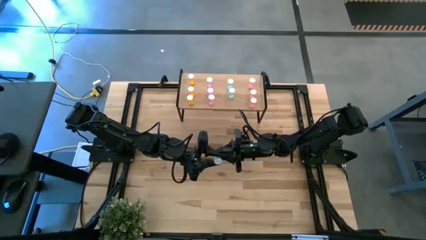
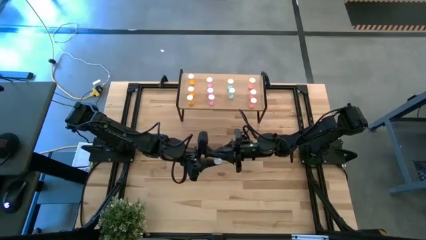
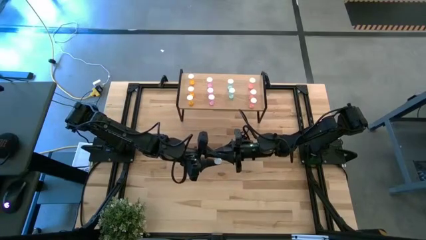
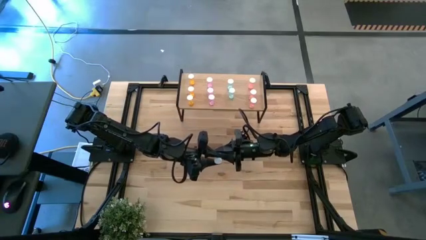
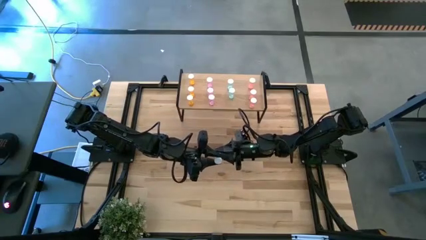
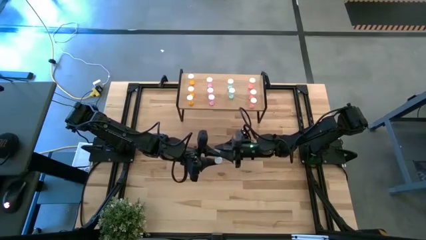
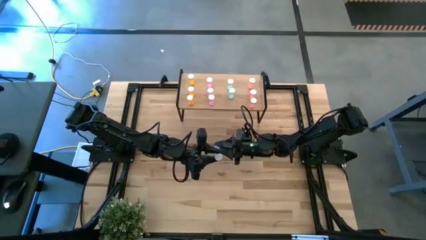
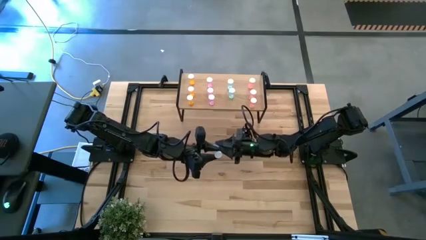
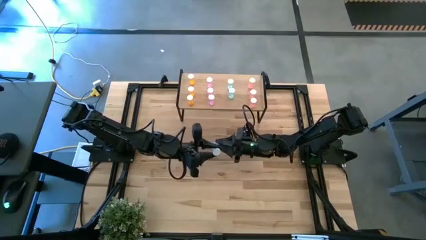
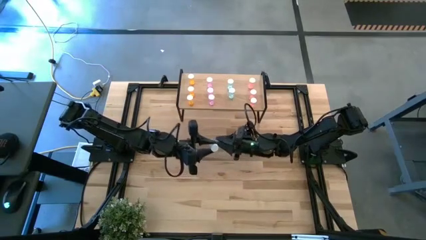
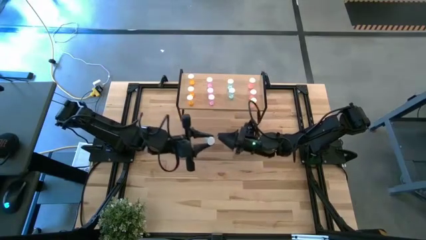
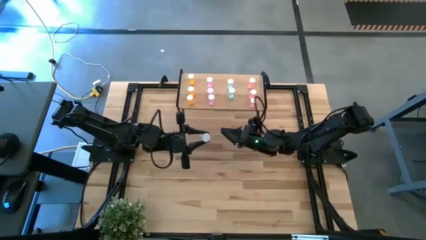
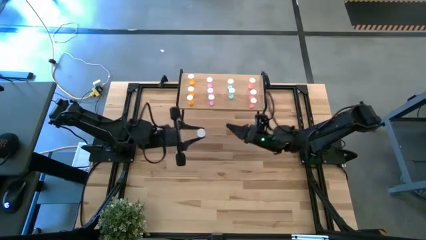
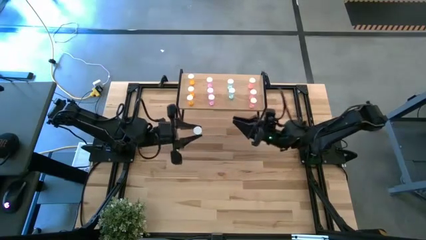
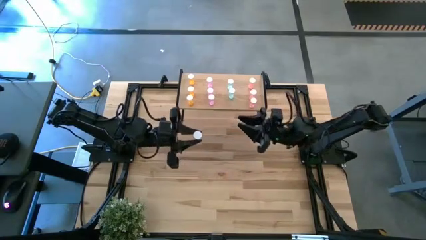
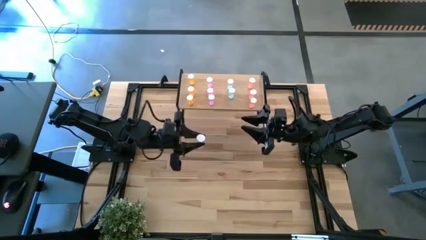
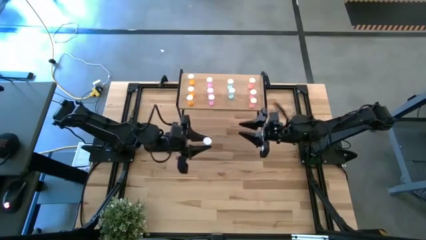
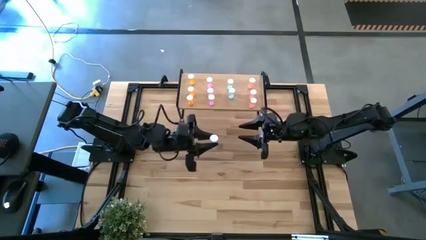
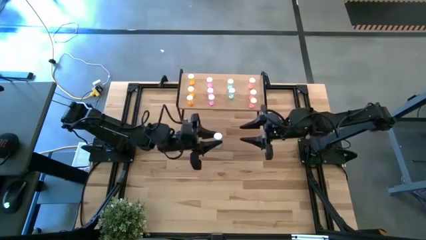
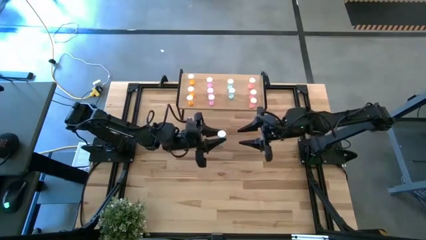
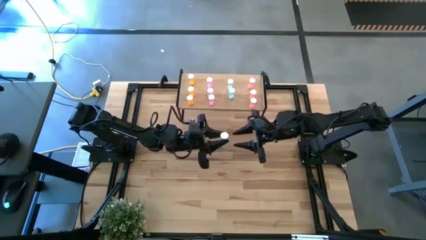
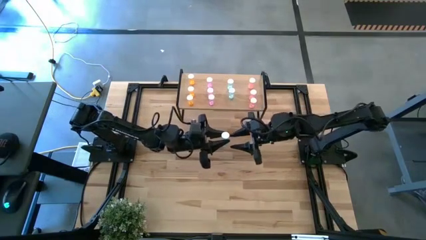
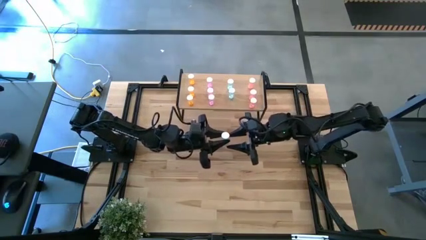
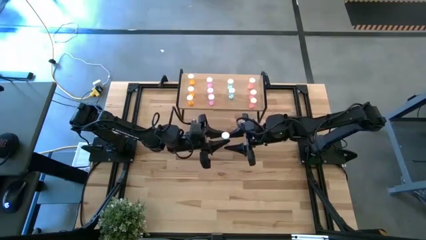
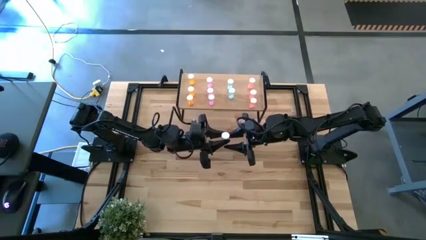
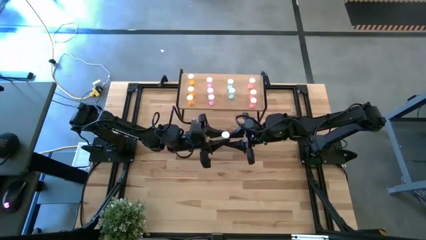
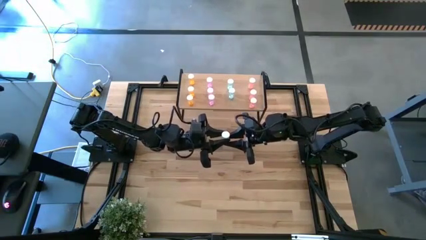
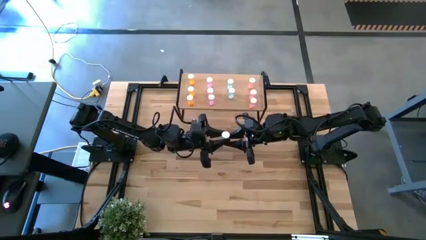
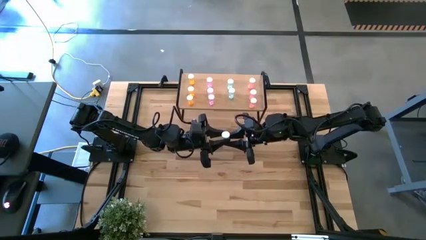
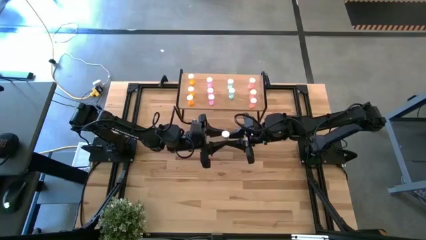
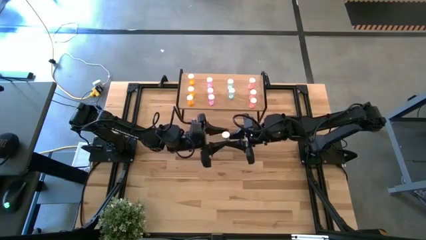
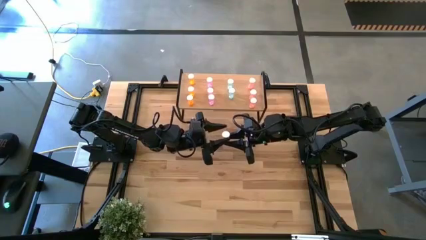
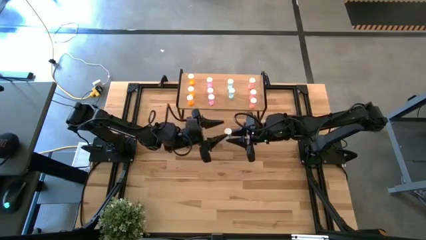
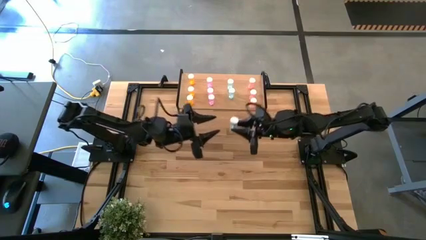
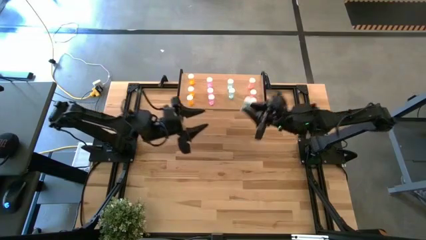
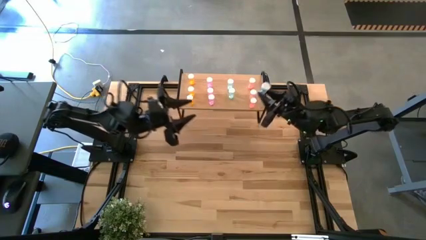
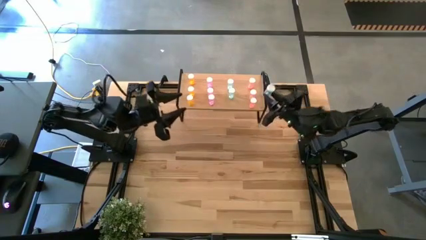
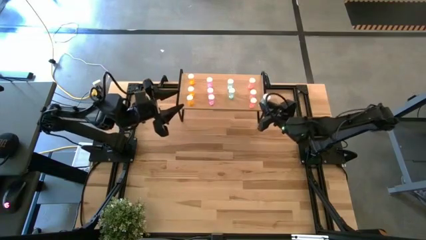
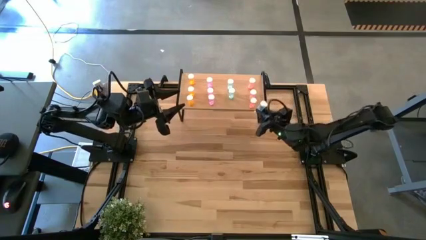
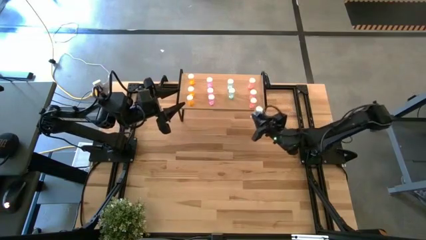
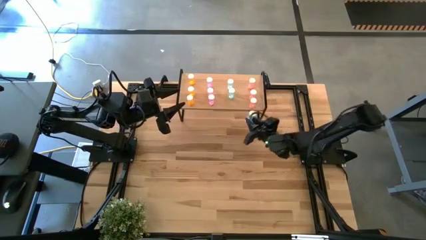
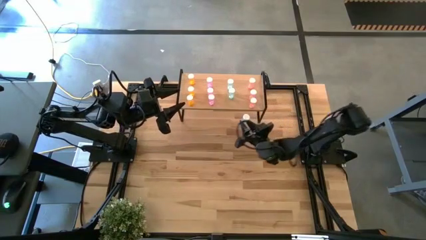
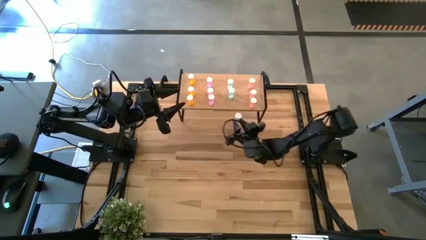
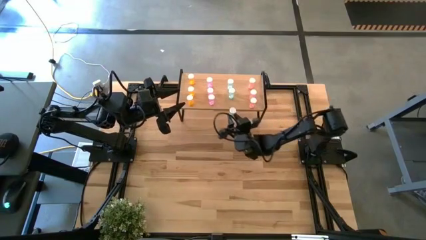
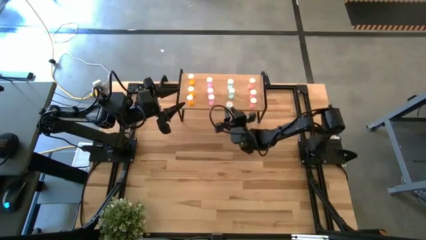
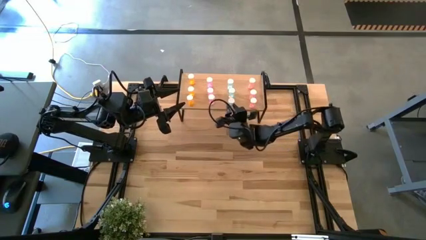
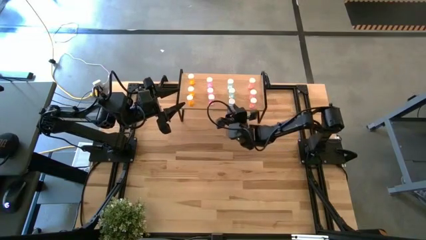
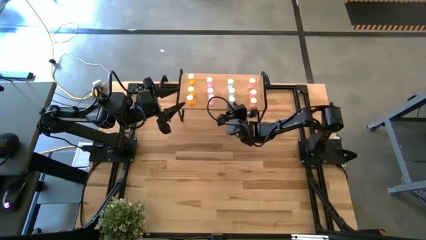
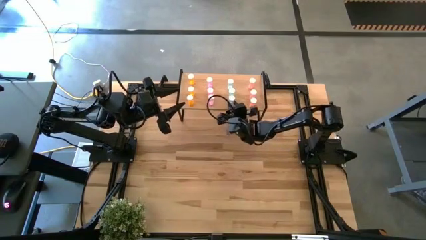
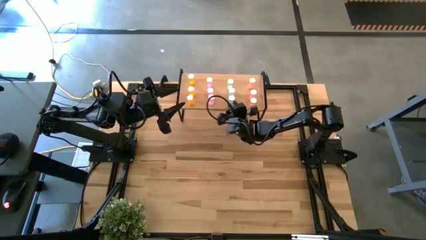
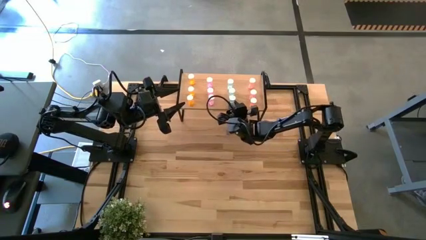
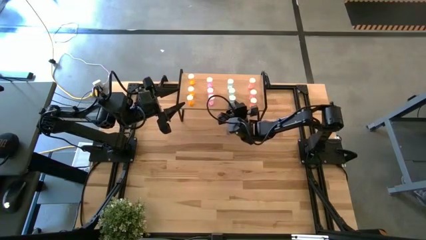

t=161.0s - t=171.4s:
Task: Pick and place medicine bottles onto shelf by color
Put the blue medicine bottle on the shelf aligned with the other blue medicine bottles

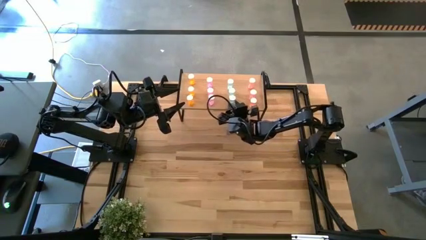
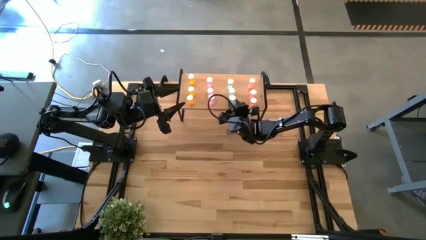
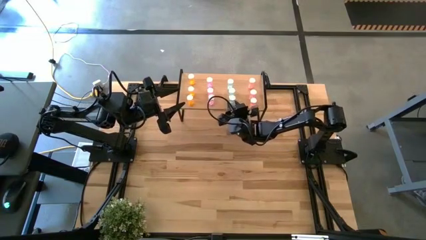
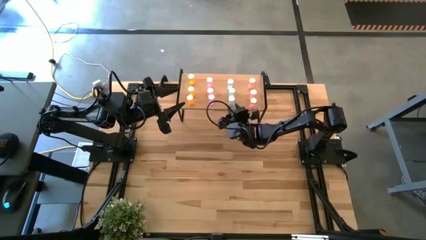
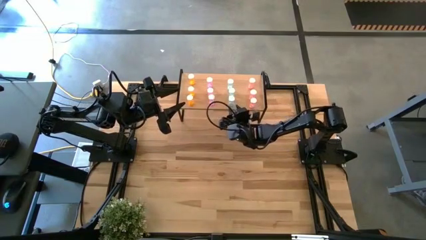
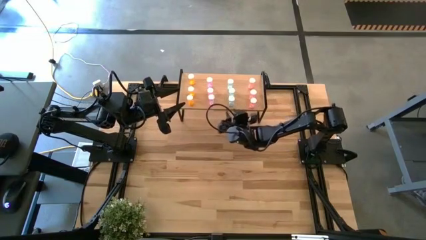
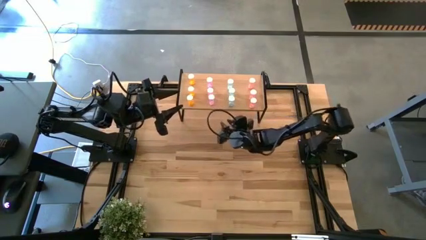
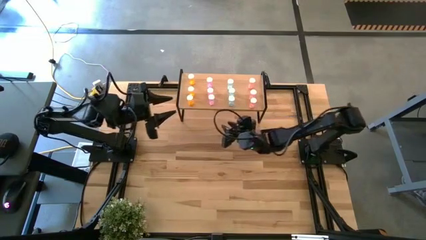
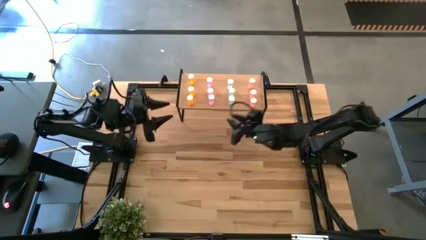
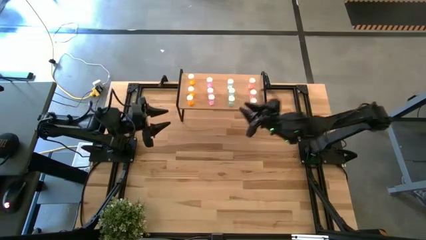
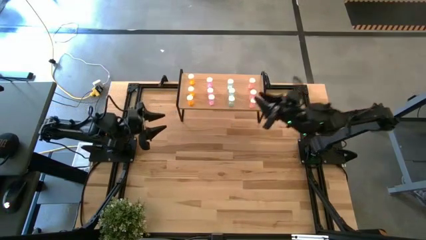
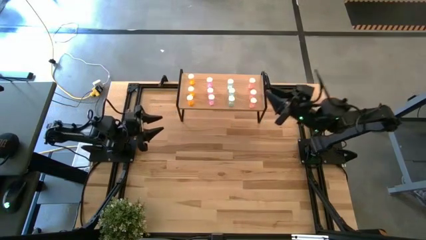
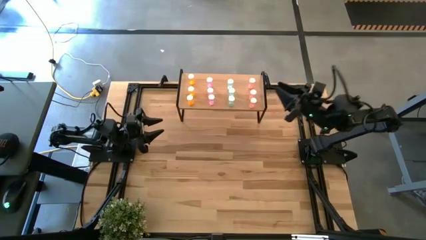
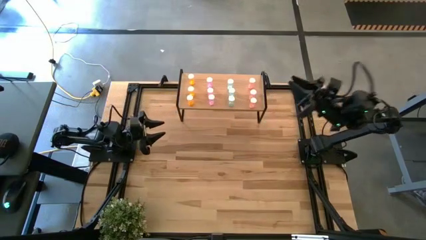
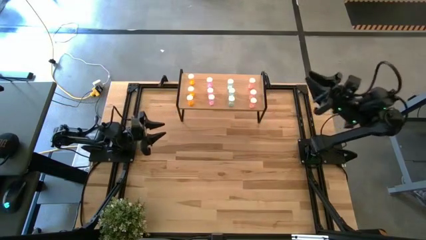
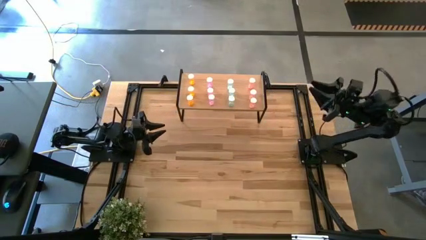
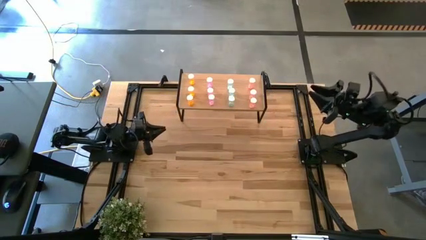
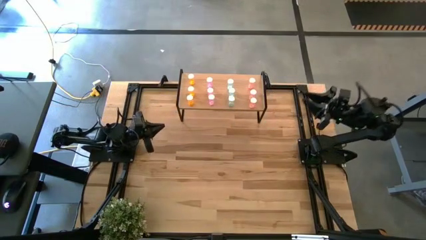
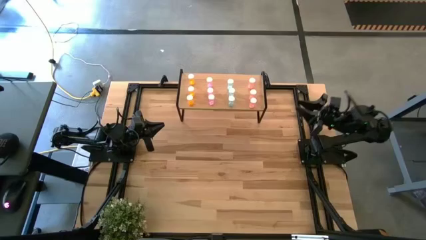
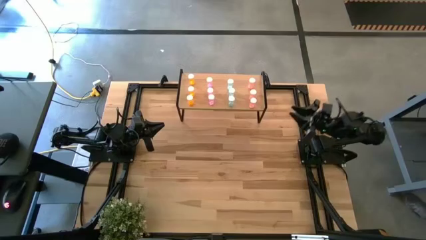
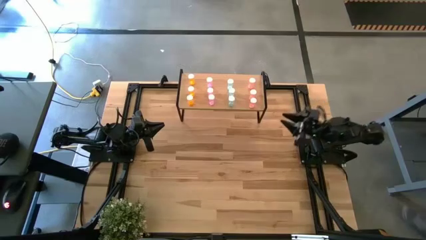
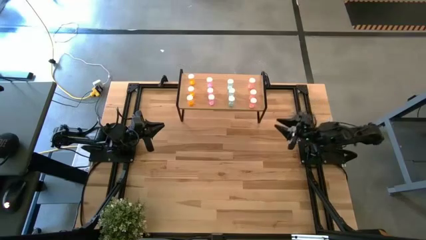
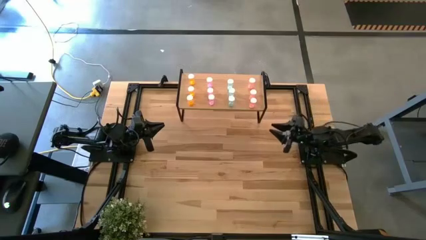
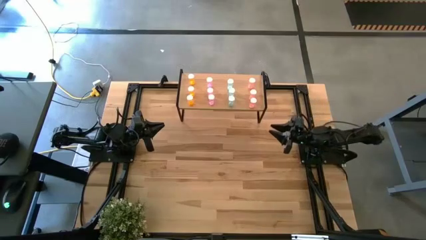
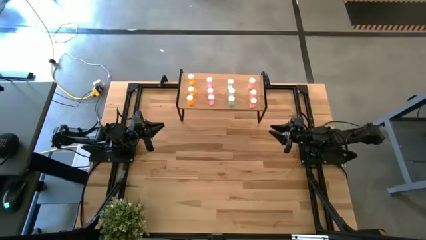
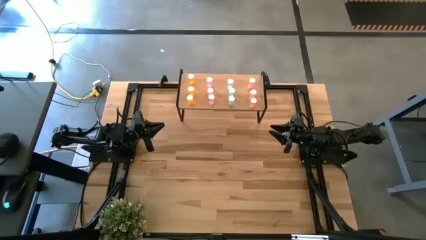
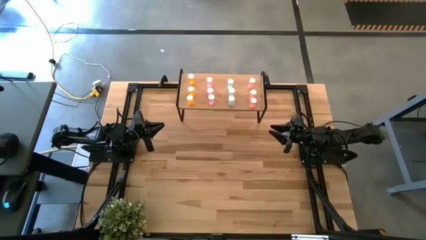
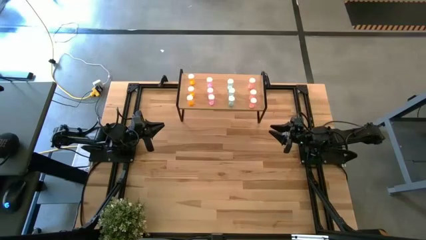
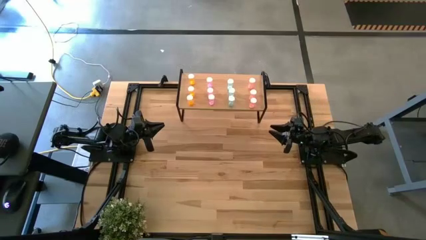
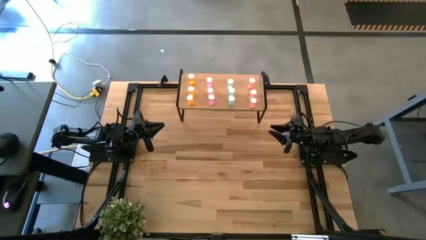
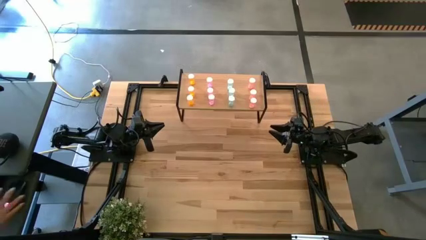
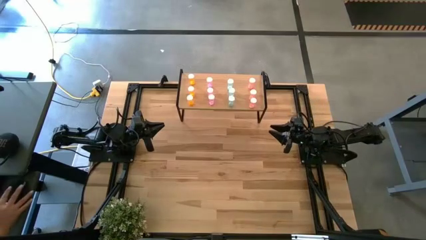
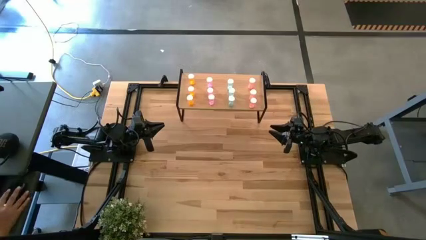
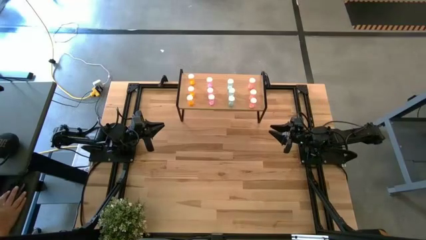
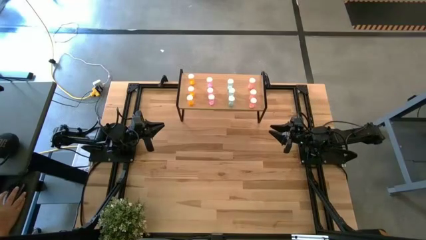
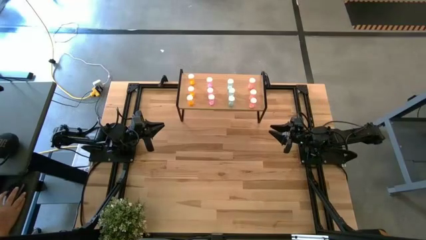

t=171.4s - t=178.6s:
Return to Home Position
